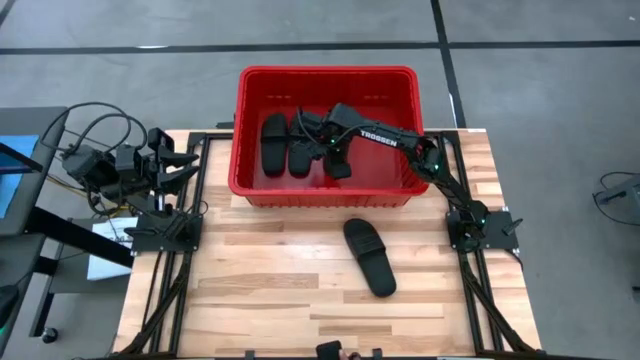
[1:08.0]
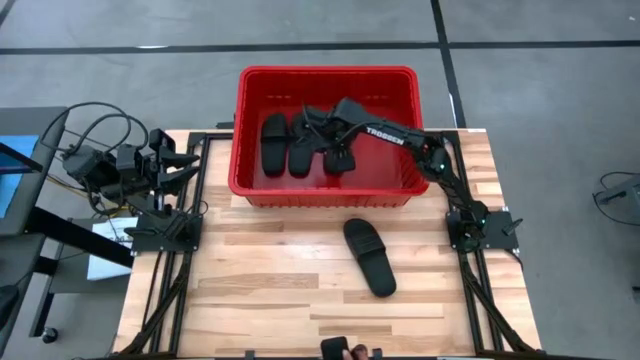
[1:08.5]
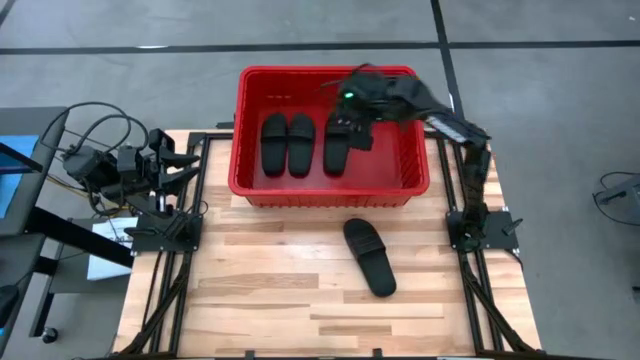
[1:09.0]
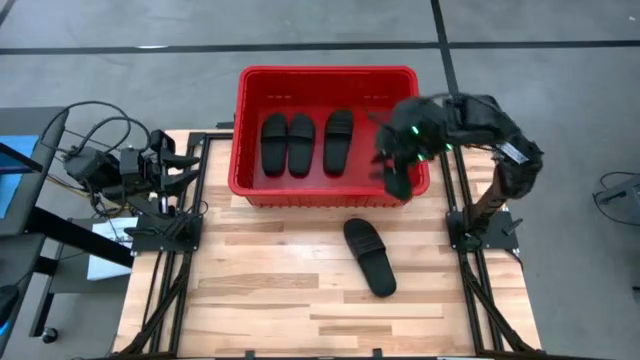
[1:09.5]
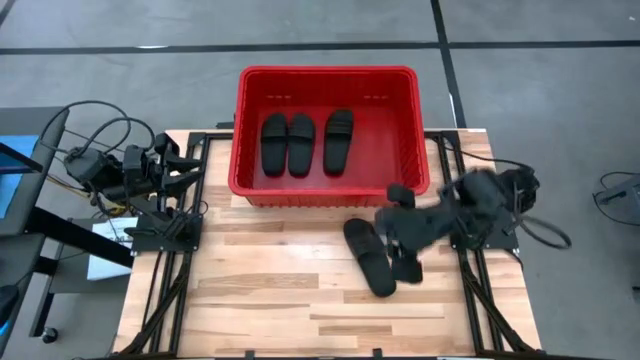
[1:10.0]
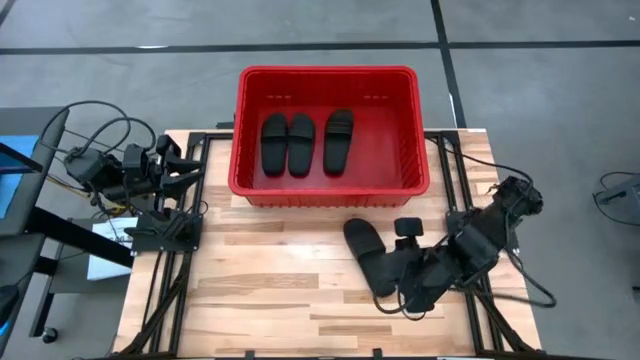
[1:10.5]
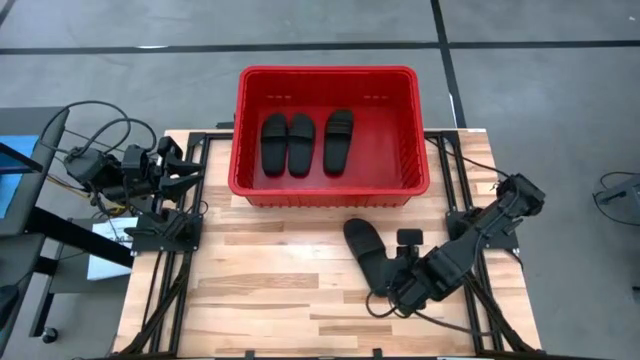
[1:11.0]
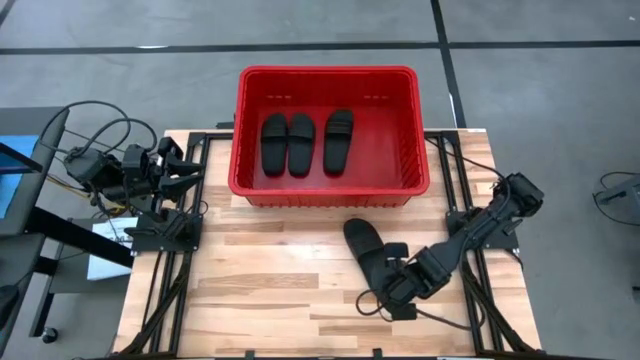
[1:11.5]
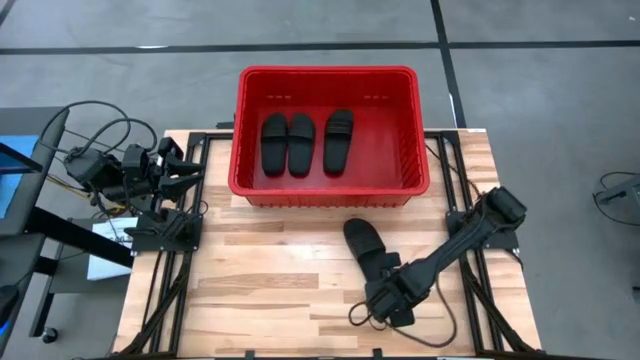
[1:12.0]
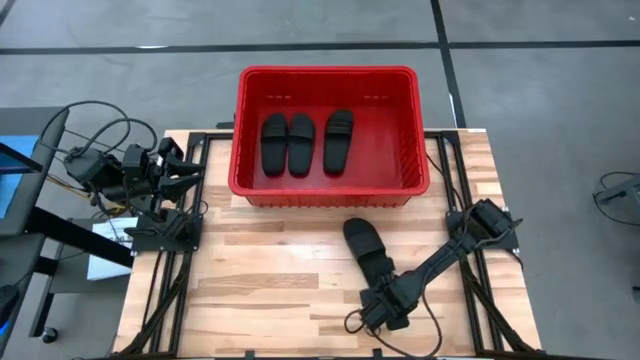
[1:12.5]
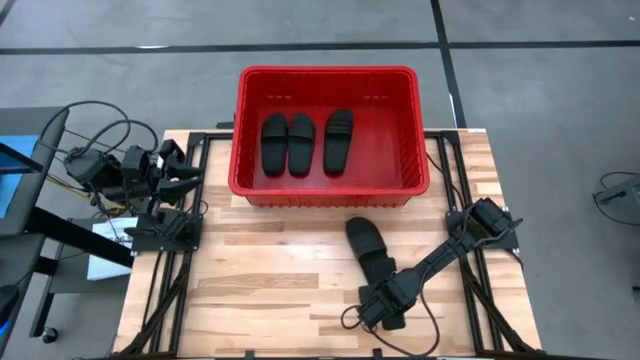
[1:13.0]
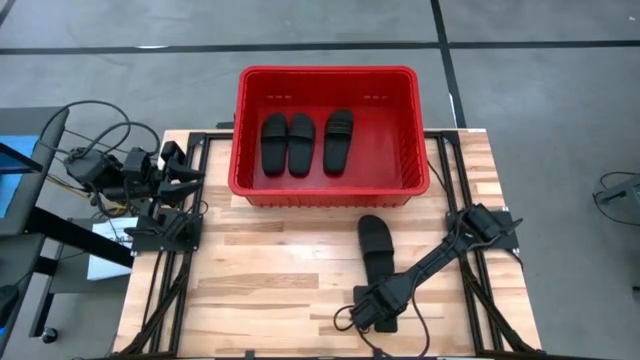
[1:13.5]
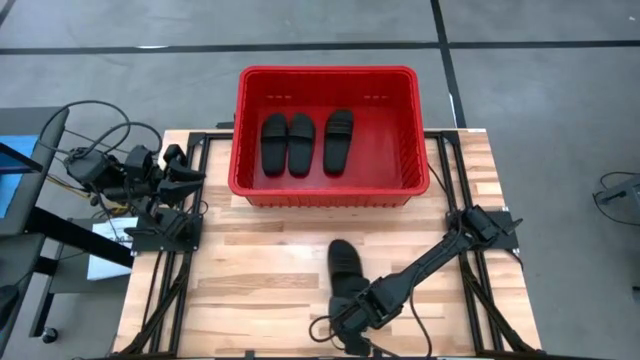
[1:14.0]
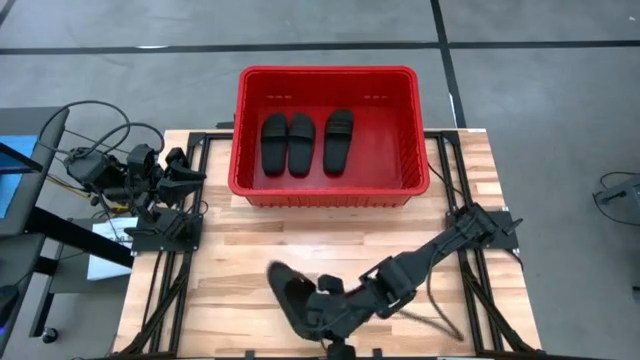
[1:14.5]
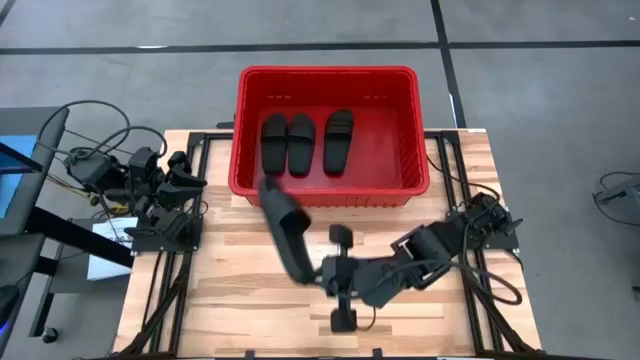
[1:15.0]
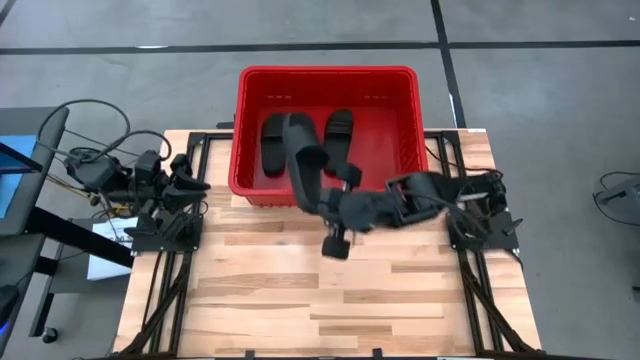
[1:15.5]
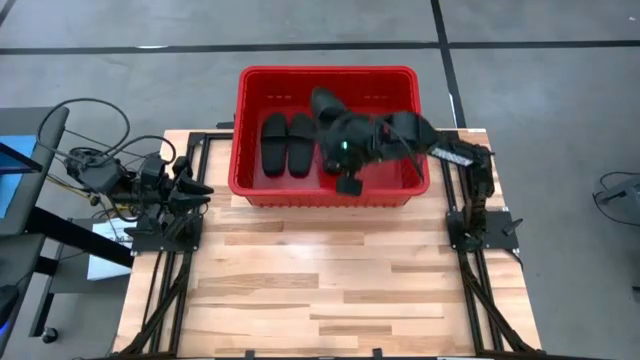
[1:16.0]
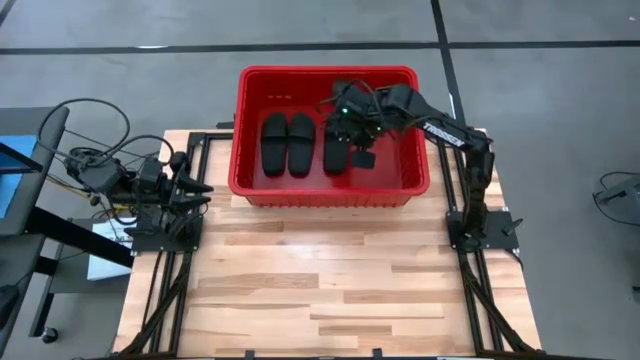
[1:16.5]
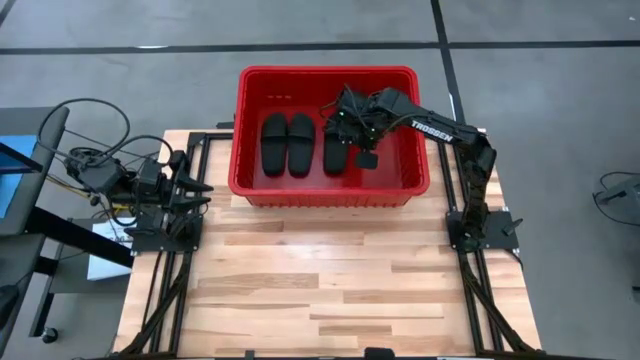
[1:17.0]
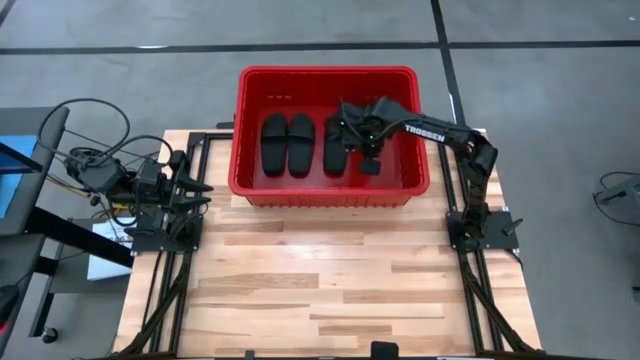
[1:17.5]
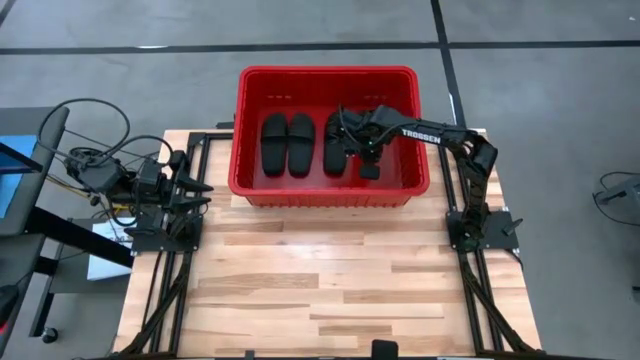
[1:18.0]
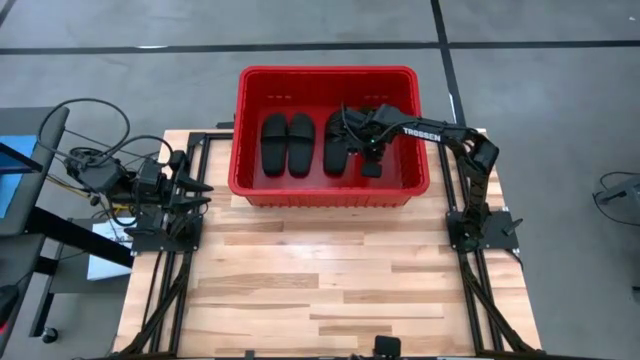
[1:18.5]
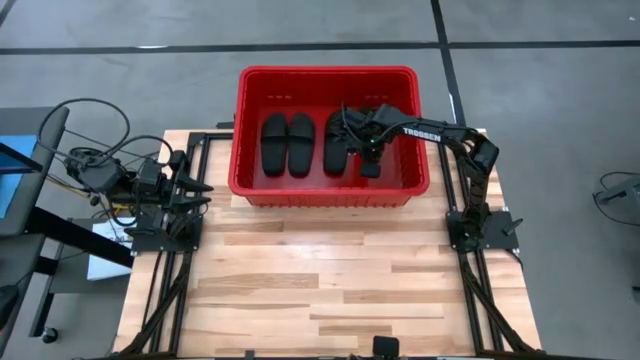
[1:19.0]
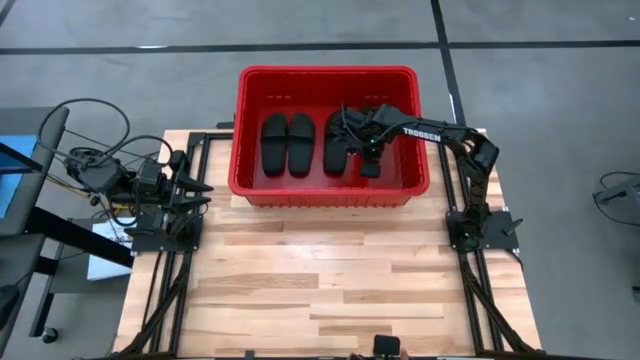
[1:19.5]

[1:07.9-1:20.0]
Task: Pick and place slides into bin
Put the black slide into the red organizer bin

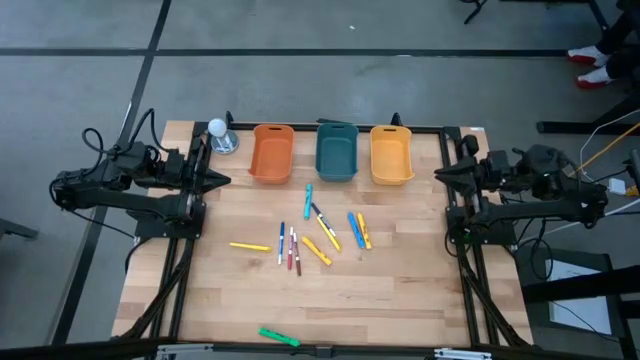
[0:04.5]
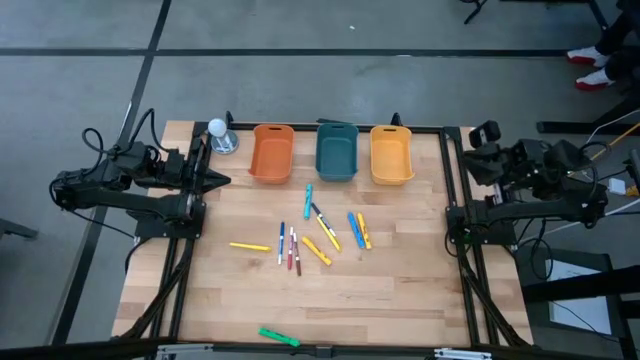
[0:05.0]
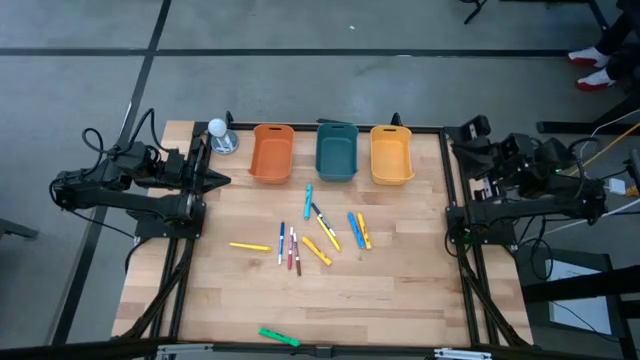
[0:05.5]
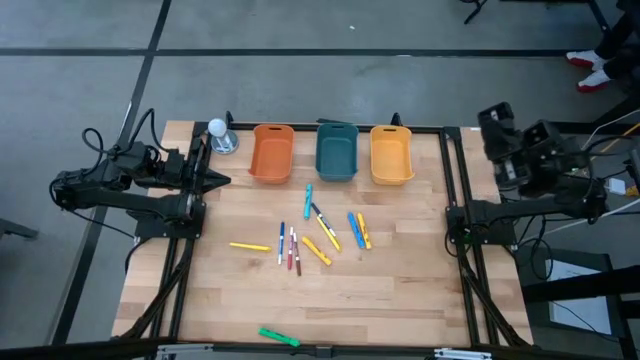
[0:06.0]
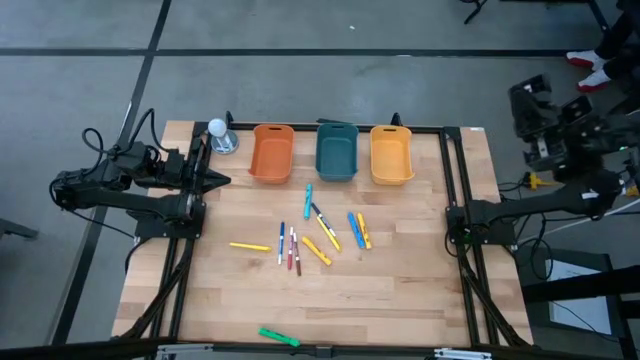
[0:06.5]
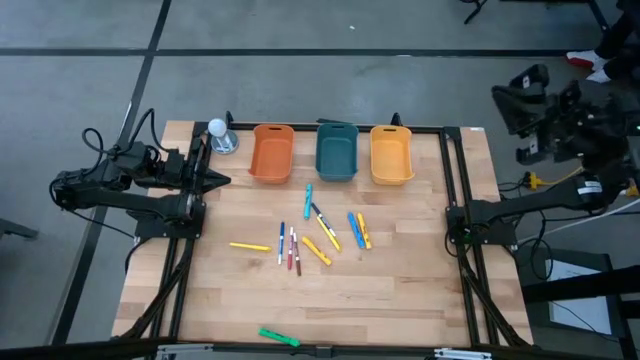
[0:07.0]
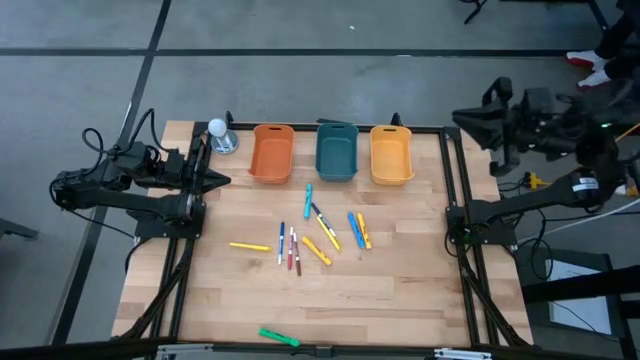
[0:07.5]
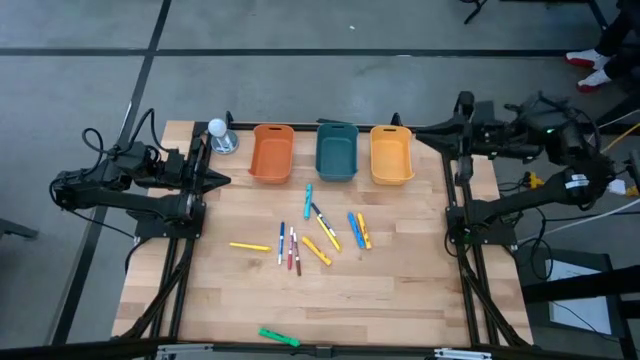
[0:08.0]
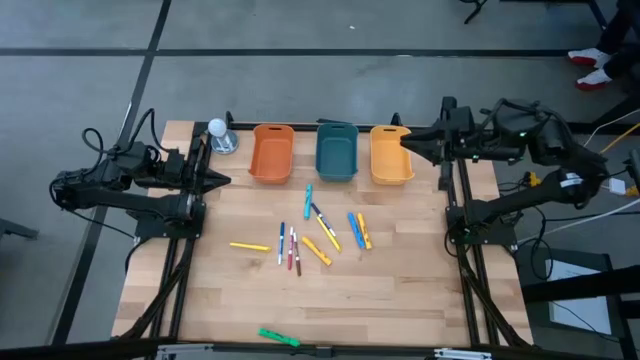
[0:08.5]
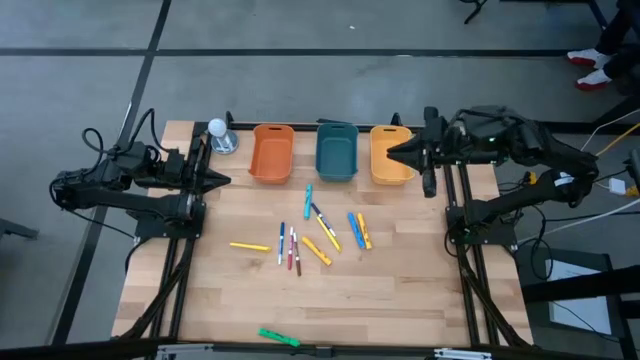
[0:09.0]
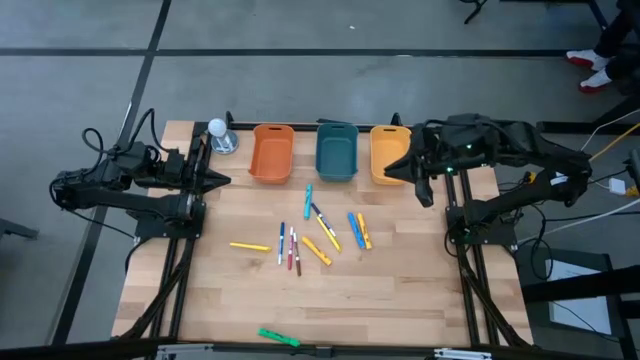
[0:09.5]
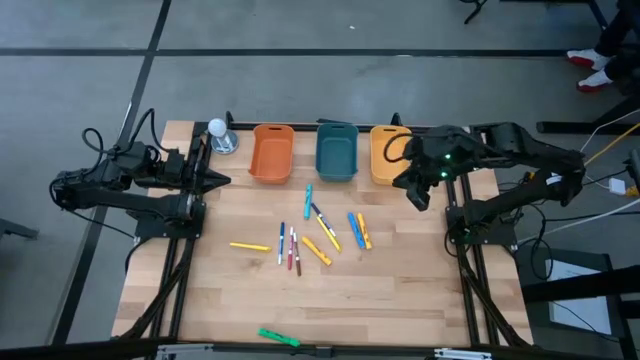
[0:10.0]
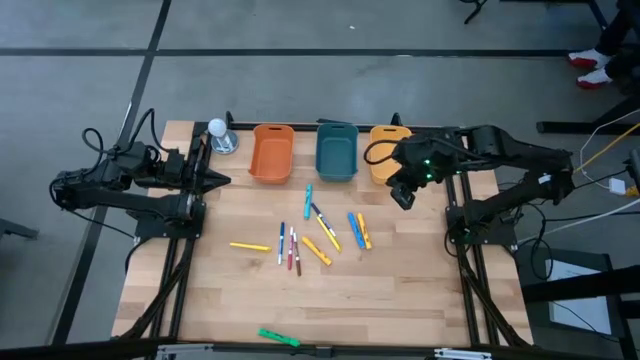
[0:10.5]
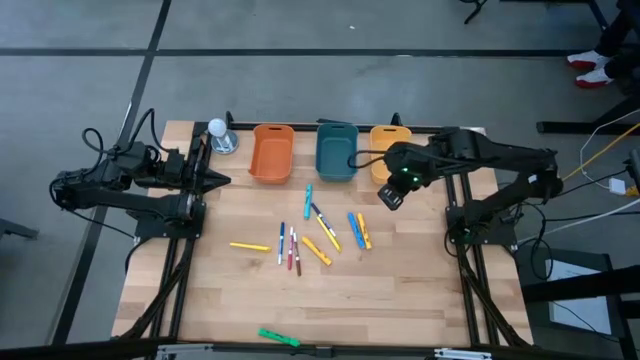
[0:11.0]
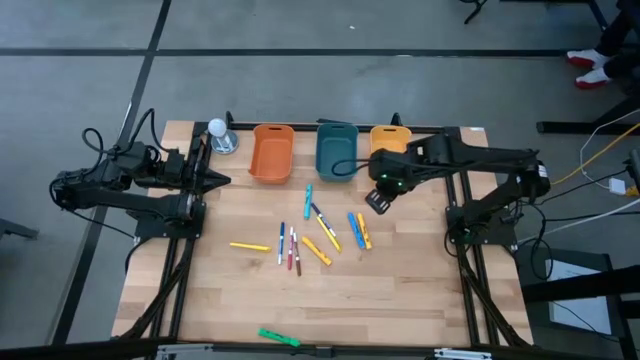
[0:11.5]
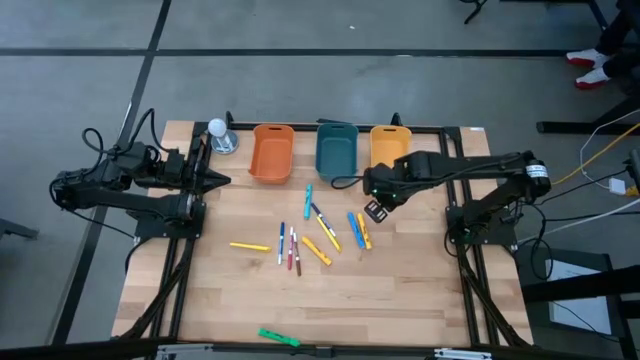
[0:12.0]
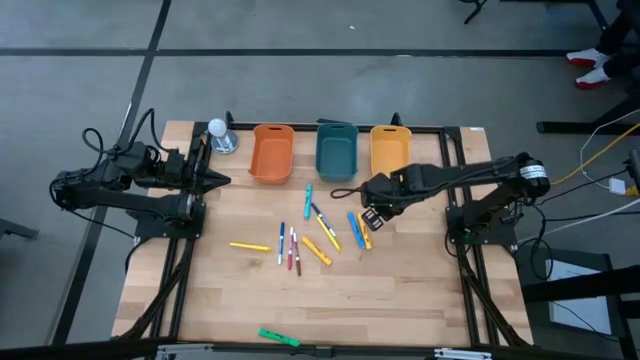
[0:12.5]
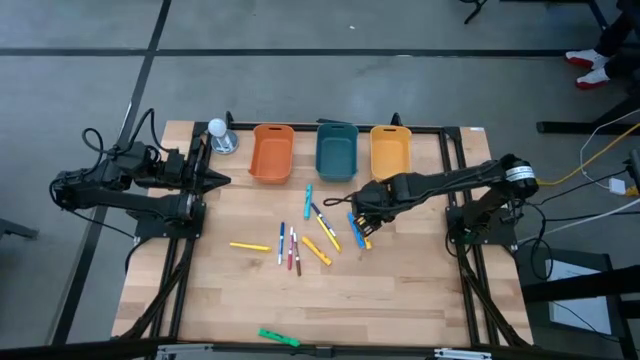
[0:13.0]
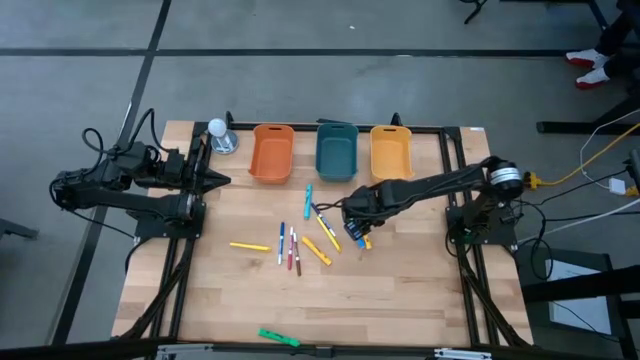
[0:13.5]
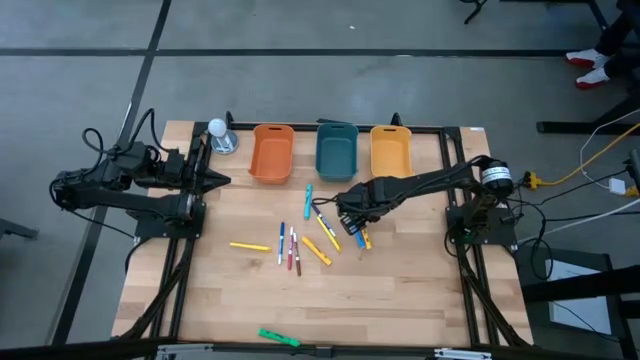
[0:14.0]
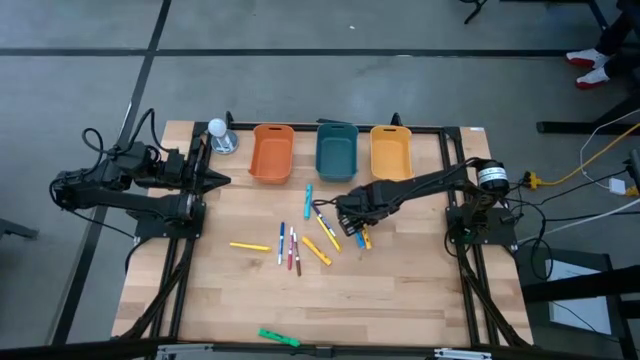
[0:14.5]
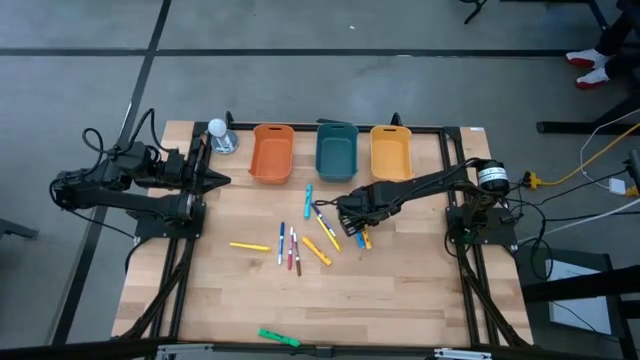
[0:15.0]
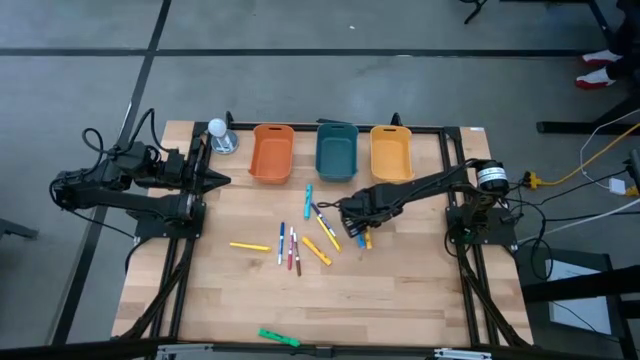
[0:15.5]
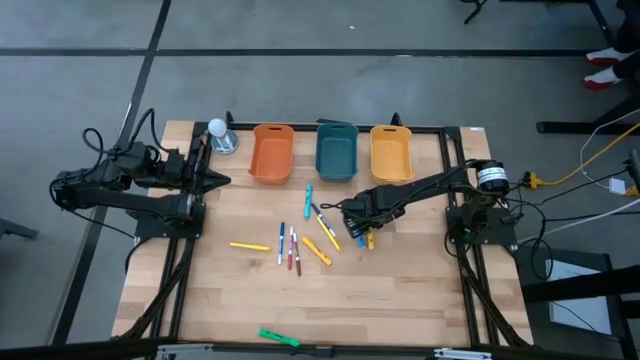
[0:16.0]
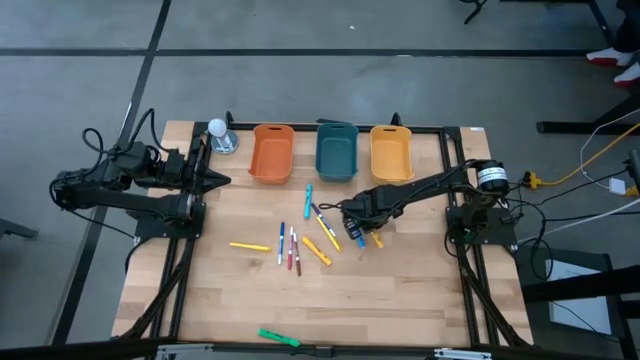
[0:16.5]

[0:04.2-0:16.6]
Task: Pick & Place Markers
Put the right yellow highlighter pen into the yellow bin
